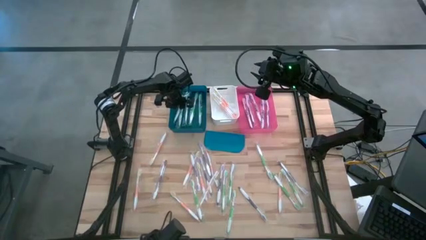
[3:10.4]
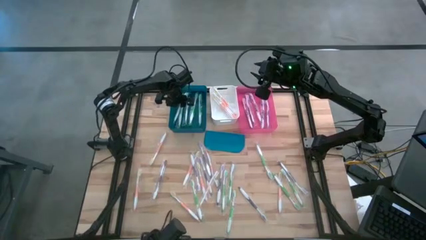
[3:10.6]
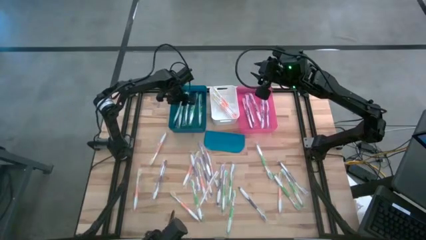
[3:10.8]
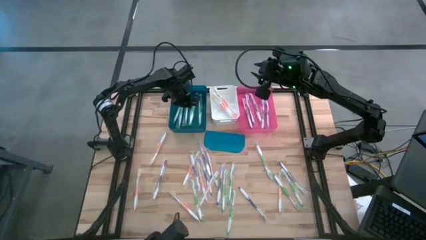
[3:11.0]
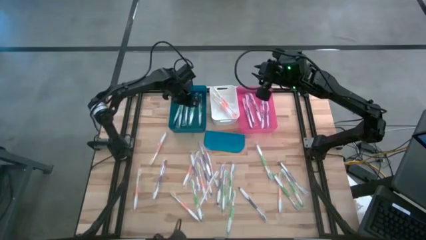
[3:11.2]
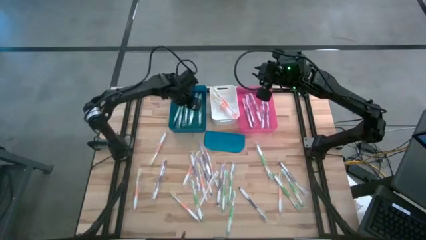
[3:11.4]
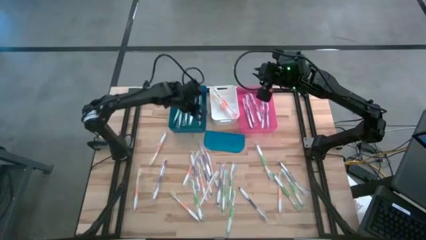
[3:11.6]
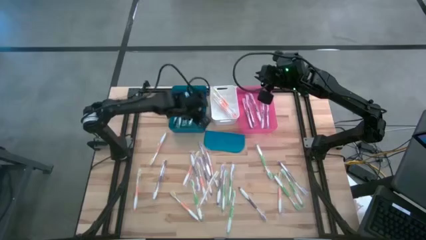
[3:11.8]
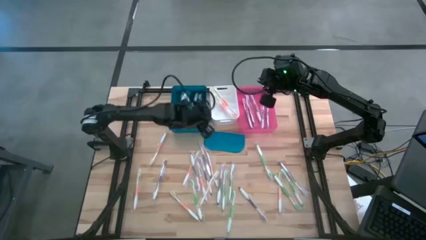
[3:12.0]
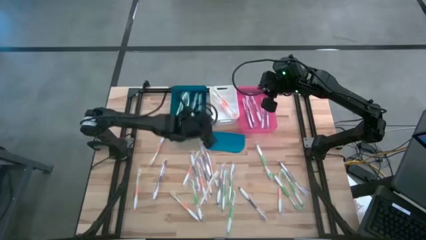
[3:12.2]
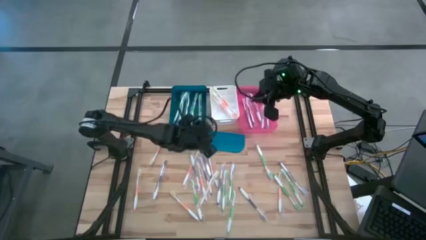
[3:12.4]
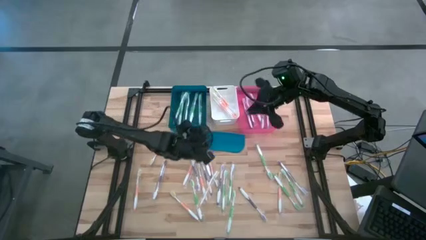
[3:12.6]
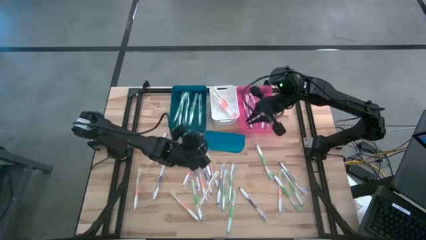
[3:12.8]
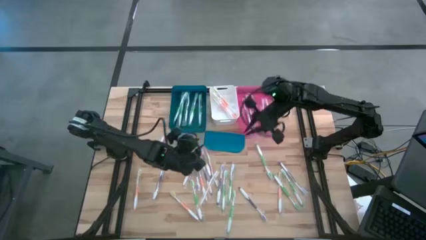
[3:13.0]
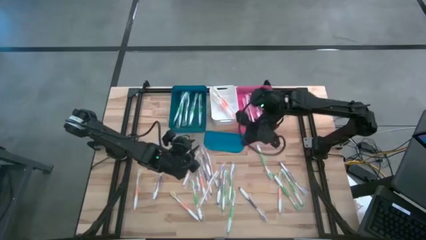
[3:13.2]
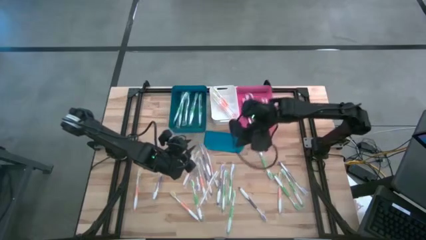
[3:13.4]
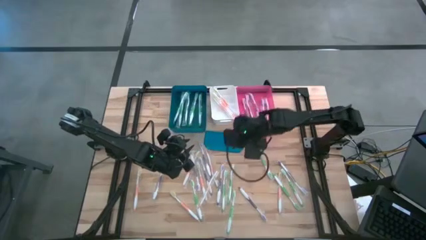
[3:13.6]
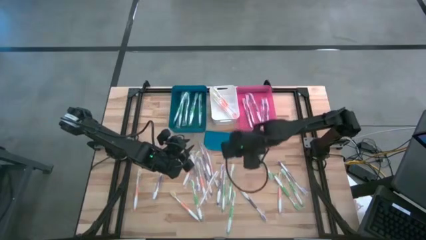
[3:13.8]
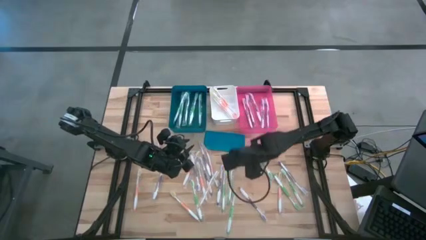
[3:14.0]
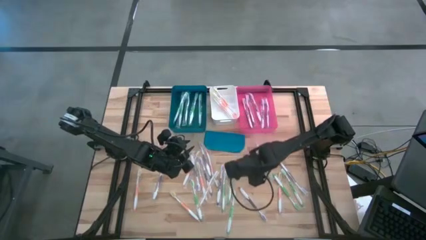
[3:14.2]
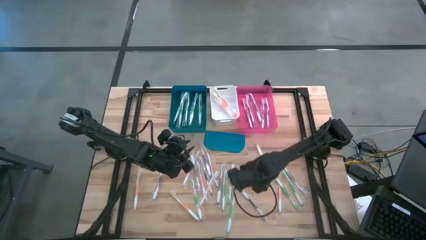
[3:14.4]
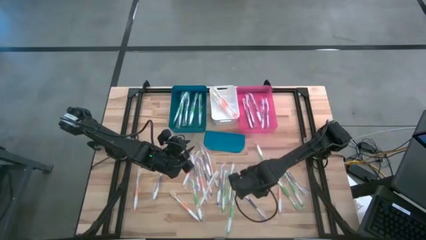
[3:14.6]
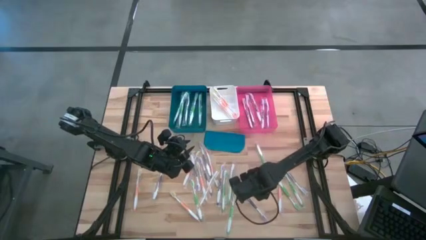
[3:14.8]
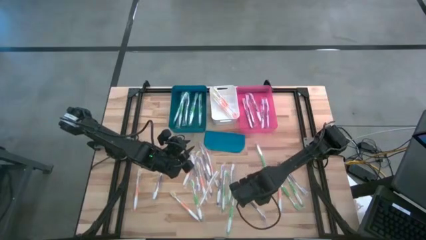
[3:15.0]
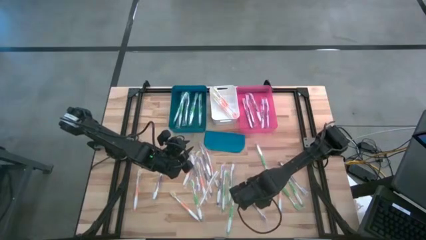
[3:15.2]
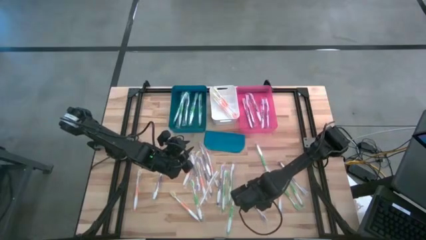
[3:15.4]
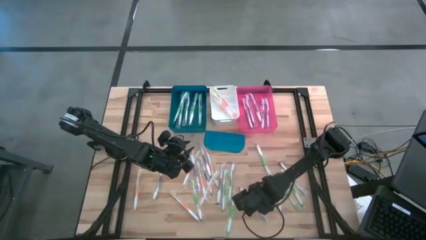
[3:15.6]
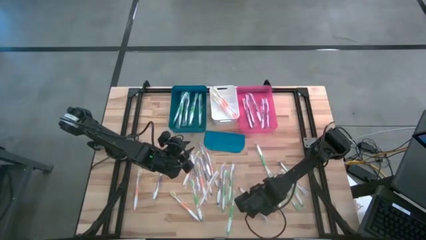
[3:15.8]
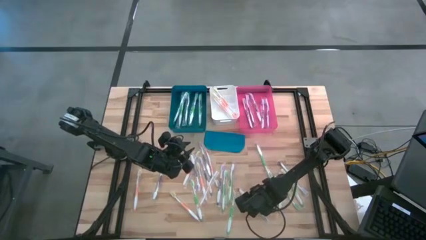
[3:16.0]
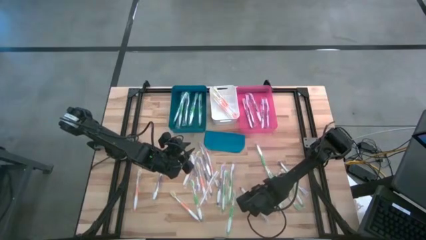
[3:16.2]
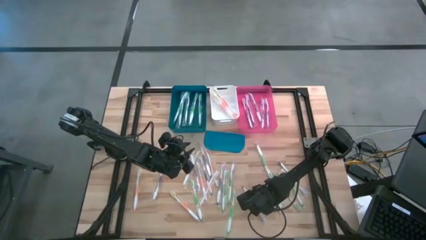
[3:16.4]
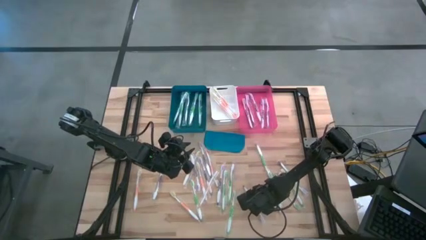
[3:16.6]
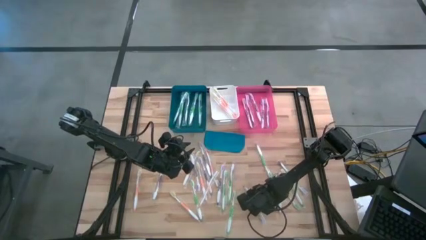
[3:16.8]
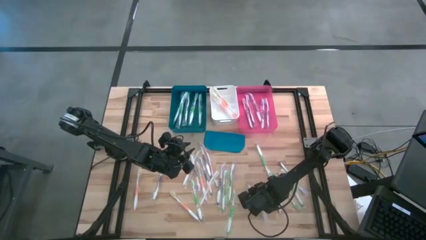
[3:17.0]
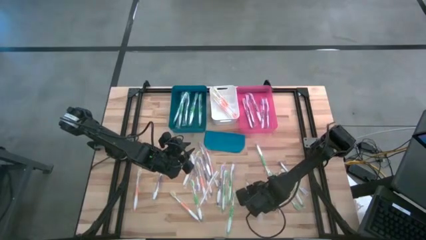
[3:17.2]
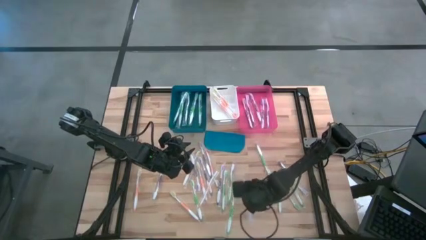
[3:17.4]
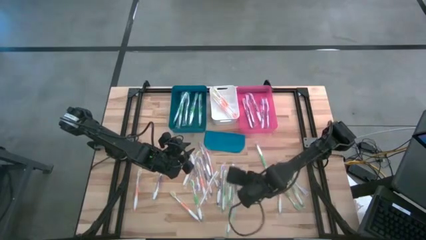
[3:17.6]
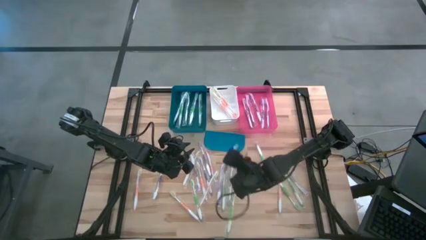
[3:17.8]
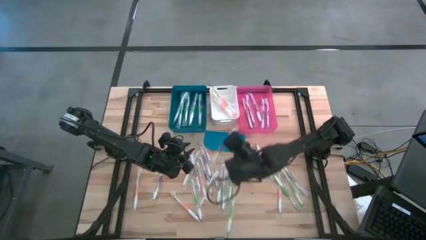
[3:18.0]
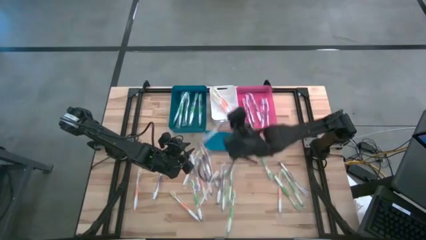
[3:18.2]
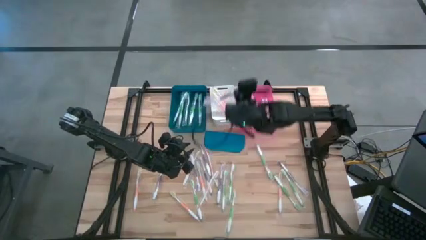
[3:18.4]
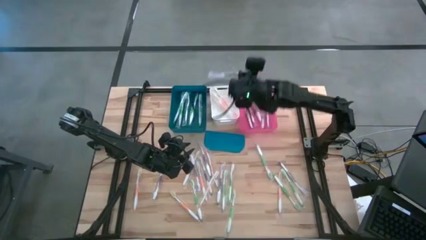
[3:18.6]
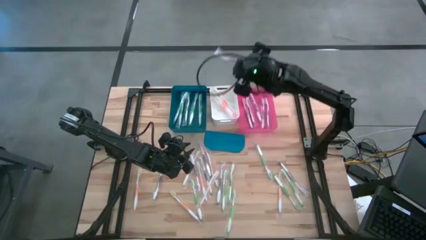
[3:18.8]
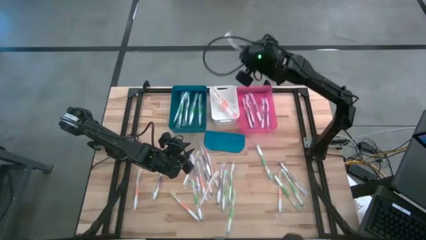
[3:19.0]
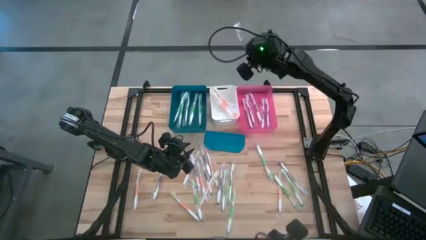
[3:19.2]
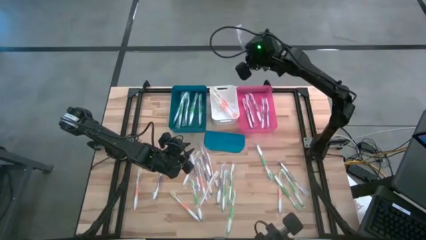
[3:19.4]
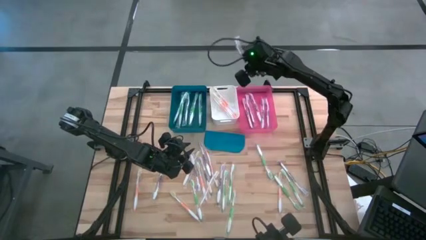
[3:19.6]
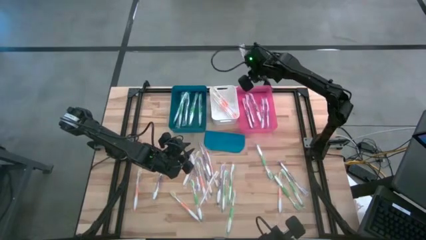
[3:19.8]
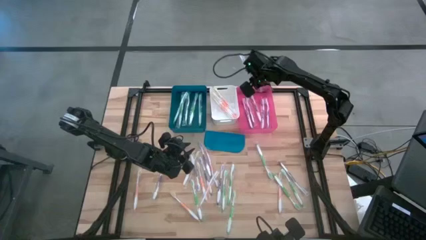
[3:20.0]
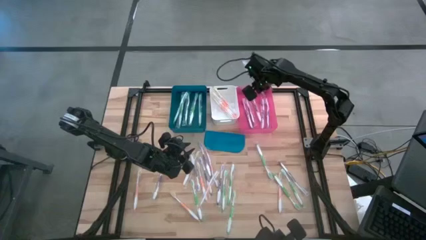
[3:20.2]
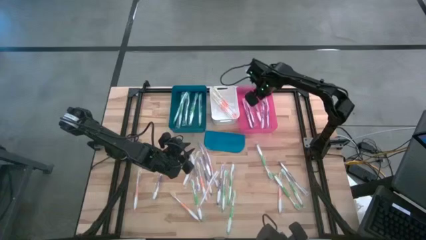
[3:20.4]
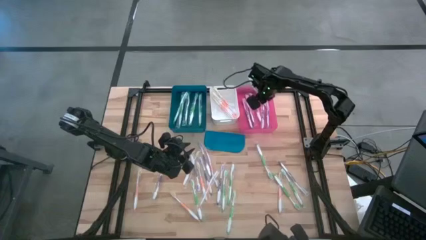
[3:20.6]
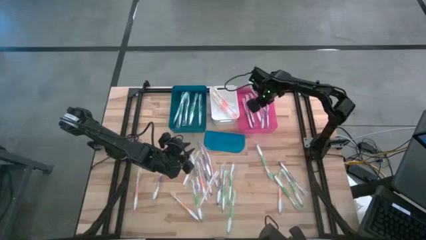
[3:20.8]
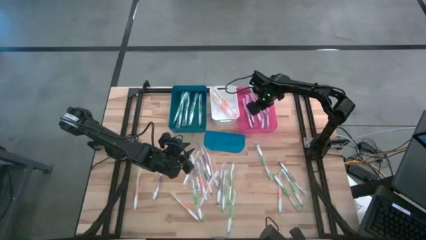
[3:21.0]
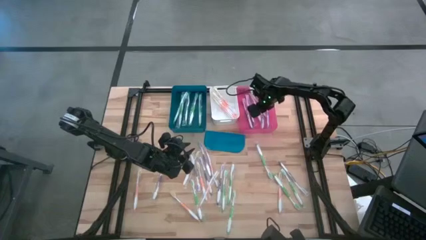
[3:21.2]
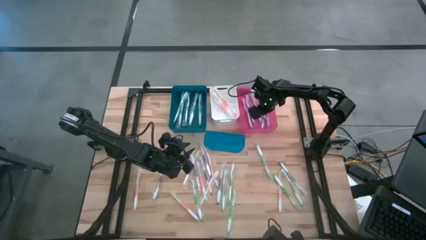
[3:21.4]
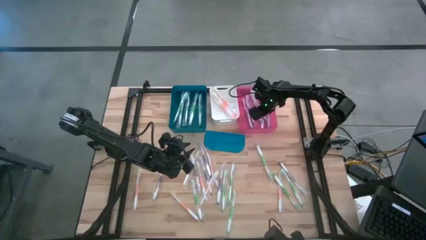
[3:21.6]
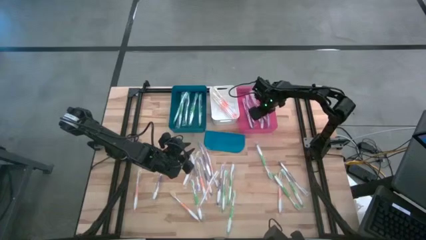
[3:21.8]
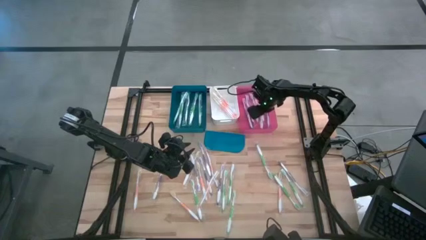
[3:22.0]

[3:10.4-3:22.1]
Task: Pick & Place Toothbrushes
Put the purple toothbrush into the pink bin

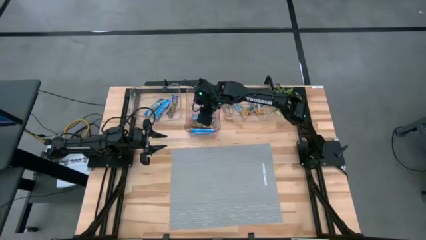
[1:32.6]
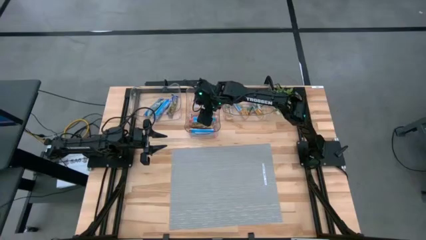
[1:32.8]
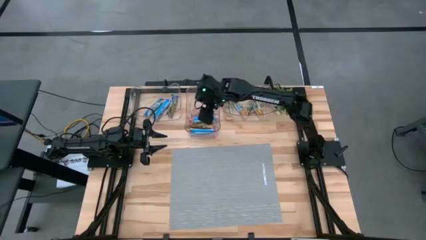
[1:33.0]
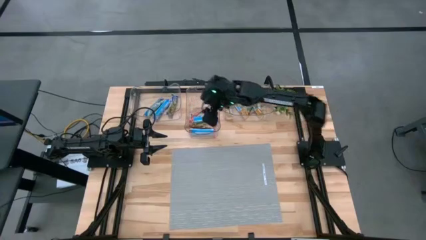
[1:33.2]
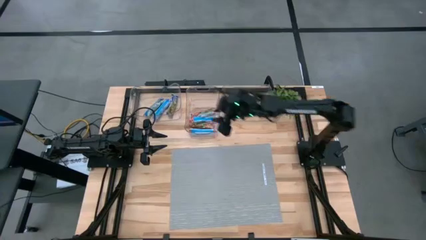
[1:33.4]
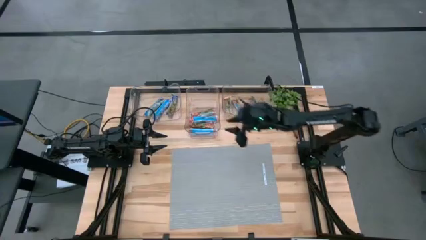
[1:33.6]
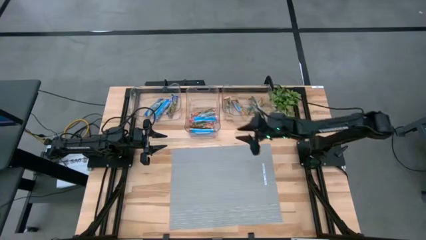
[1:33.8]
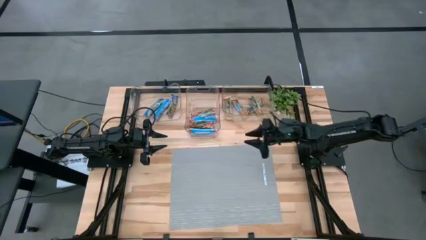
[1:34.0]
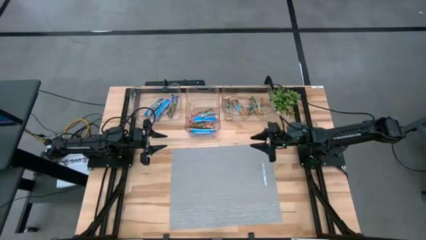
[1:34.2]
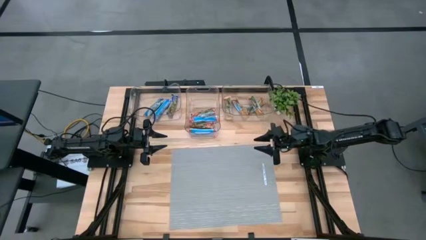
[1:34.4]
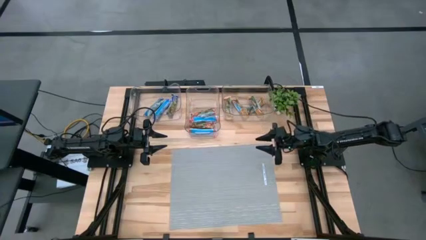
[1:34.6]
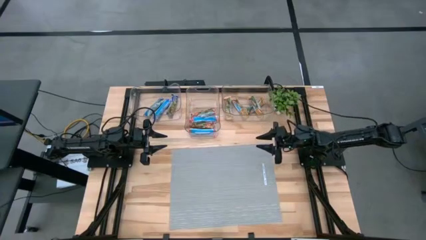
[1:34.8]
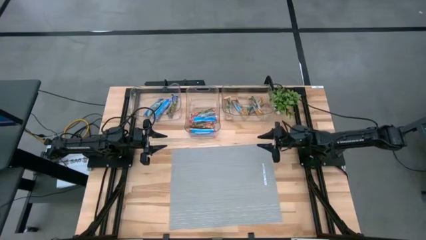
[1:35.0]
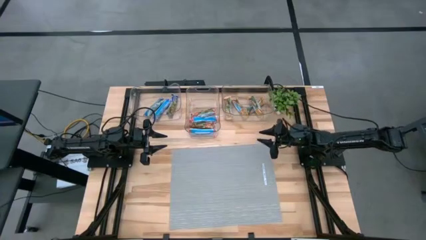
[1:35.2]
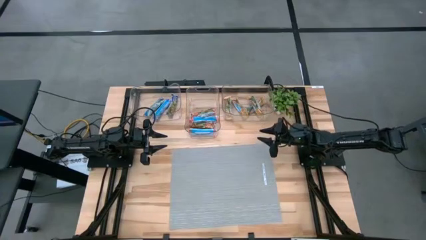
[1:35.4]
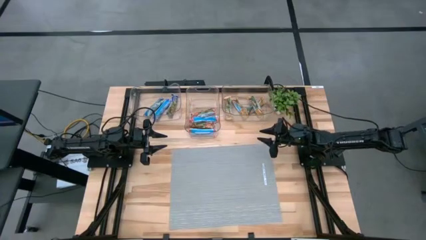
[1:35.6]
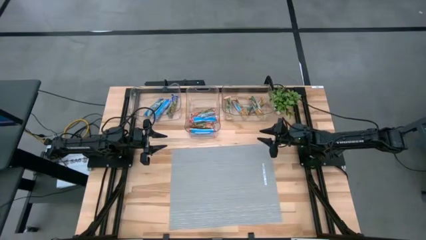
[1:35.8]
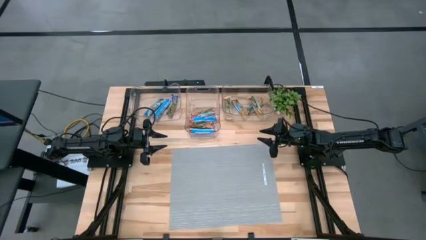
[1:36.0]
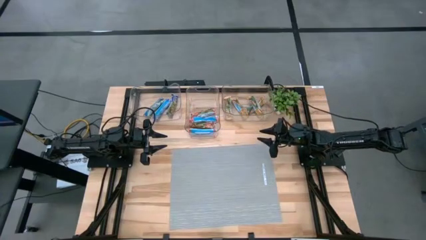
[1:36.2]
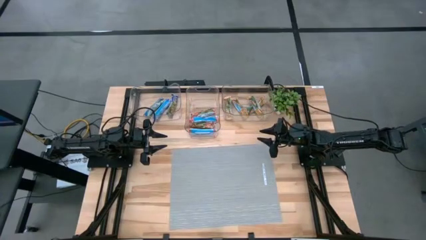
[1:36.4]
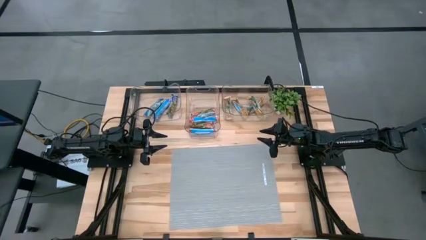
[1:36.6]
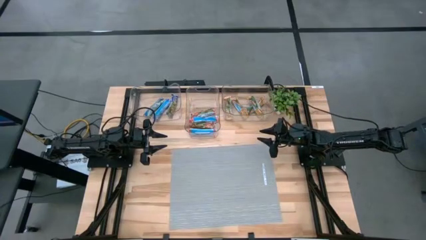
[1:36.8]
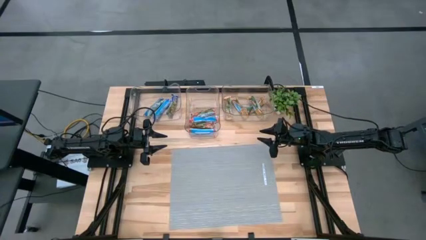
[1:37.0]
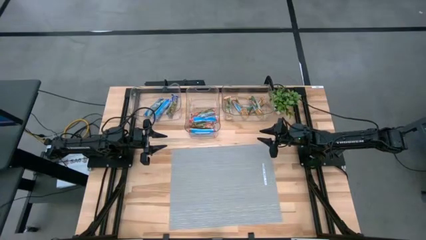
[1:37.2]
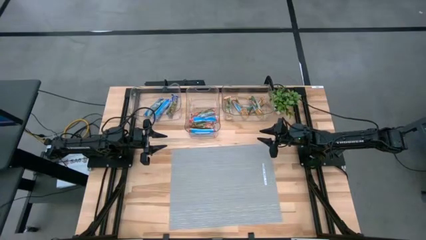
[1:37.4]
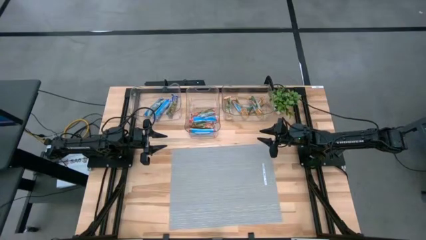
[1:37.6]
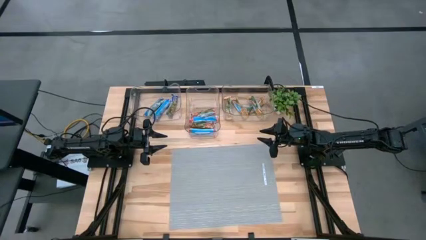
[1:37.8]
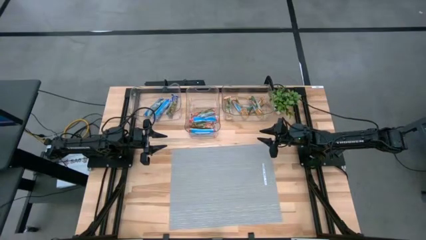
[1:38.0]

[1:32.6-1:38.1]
Task: Pick and place Granola Bars by type
Return to Home Position
